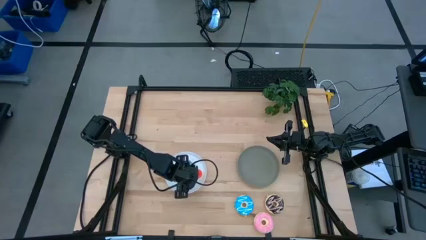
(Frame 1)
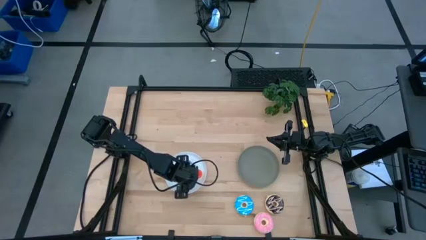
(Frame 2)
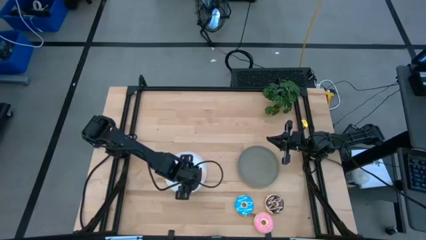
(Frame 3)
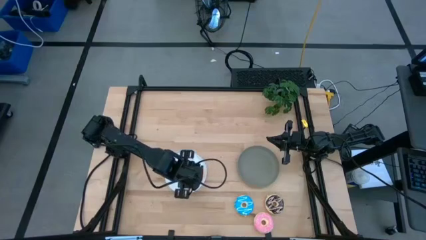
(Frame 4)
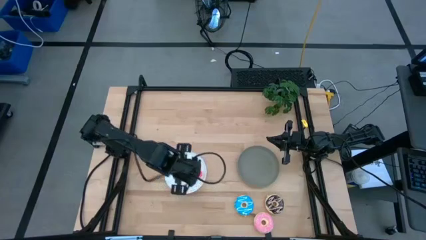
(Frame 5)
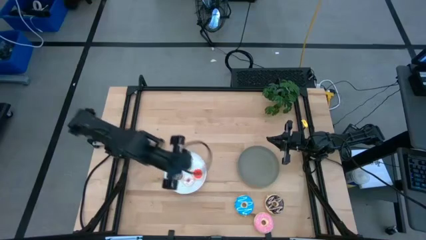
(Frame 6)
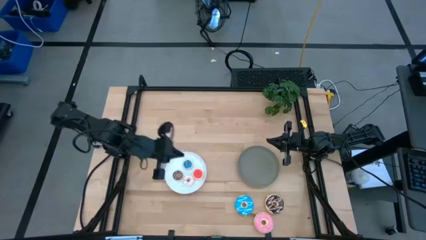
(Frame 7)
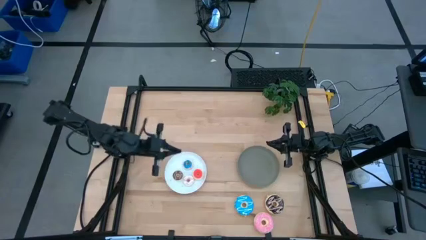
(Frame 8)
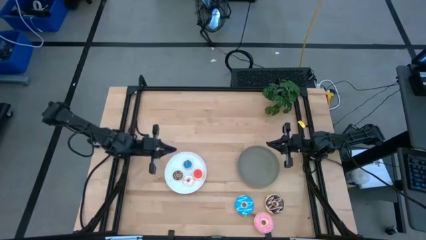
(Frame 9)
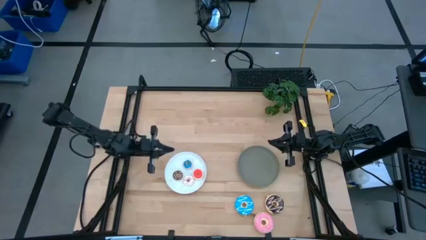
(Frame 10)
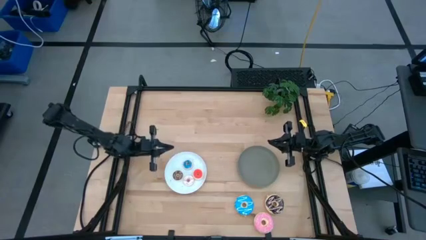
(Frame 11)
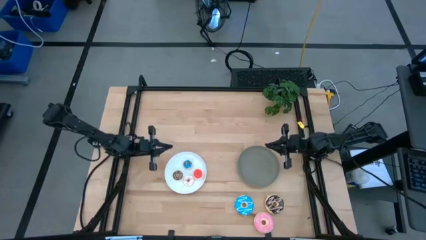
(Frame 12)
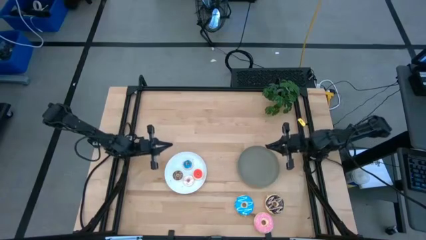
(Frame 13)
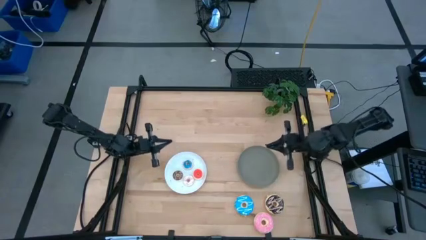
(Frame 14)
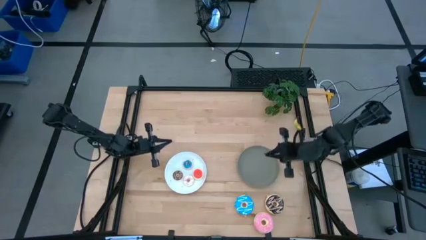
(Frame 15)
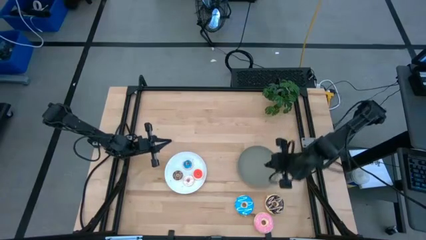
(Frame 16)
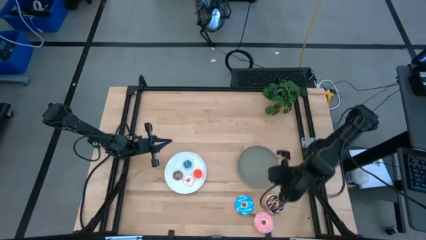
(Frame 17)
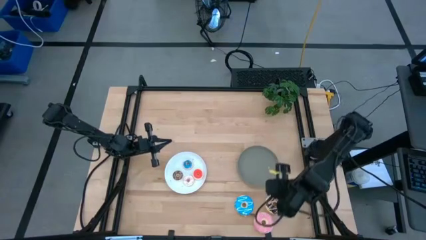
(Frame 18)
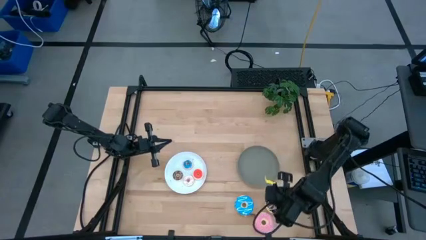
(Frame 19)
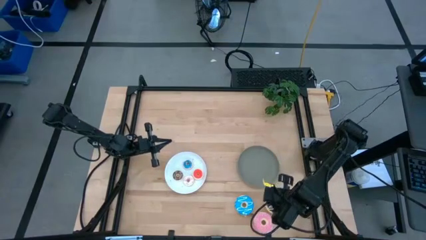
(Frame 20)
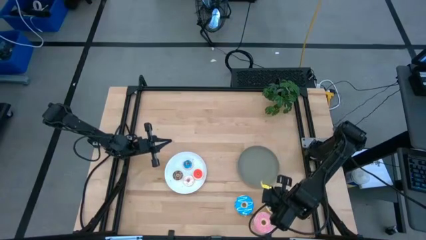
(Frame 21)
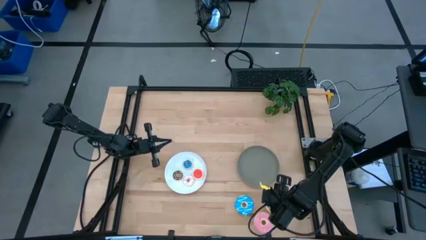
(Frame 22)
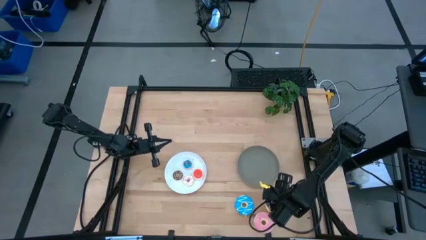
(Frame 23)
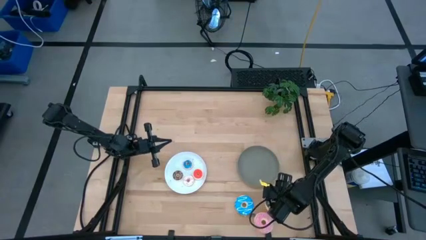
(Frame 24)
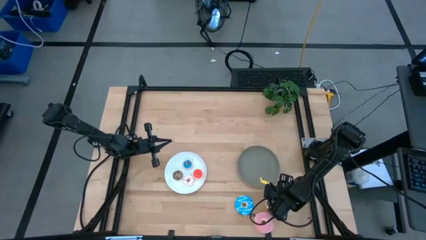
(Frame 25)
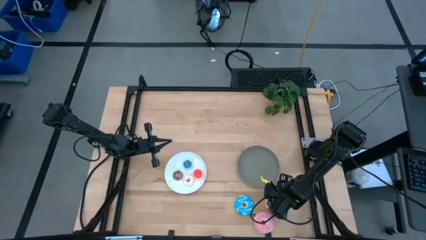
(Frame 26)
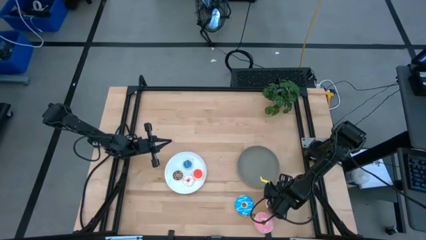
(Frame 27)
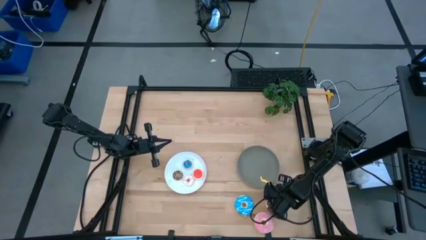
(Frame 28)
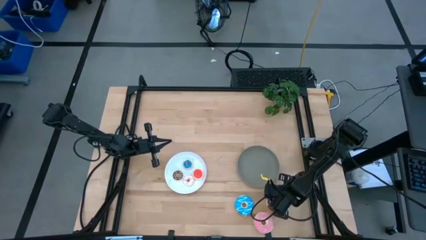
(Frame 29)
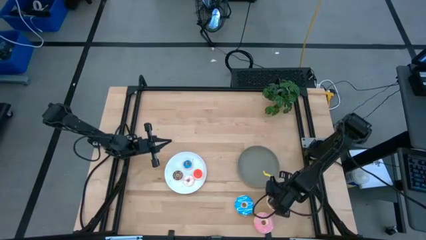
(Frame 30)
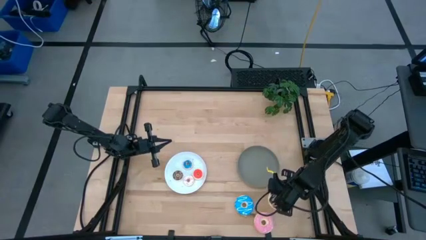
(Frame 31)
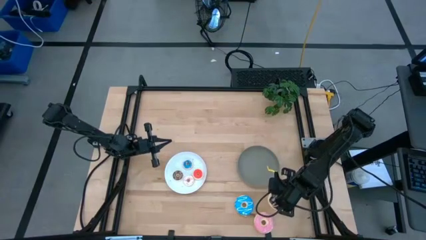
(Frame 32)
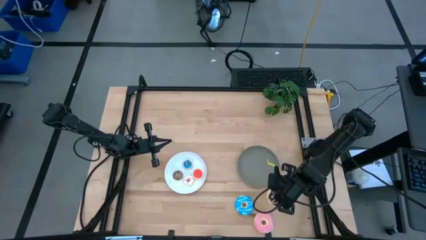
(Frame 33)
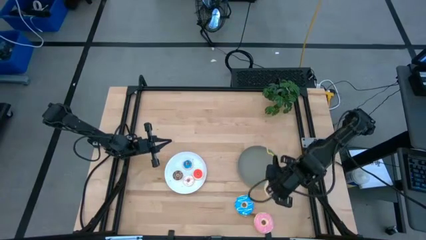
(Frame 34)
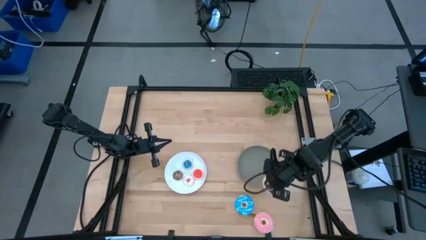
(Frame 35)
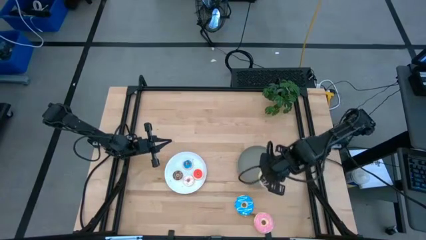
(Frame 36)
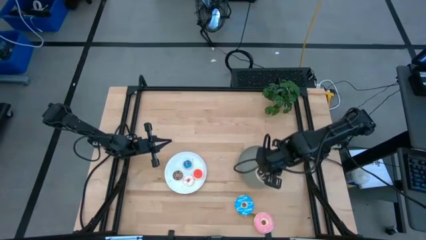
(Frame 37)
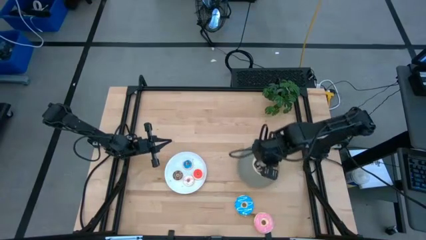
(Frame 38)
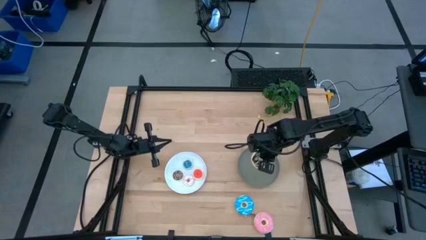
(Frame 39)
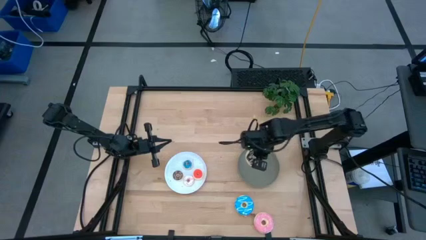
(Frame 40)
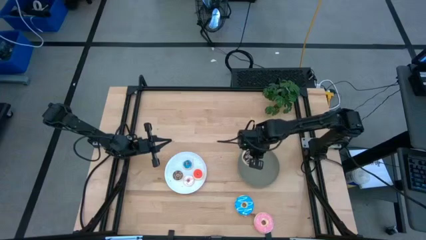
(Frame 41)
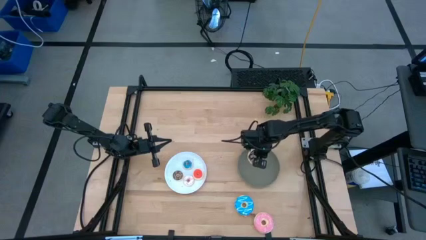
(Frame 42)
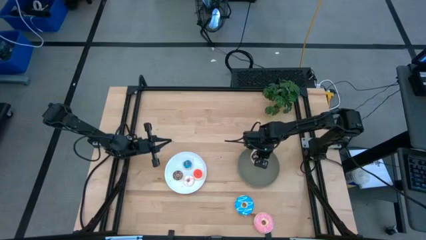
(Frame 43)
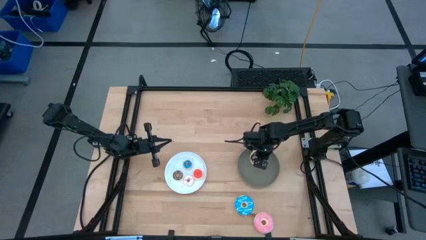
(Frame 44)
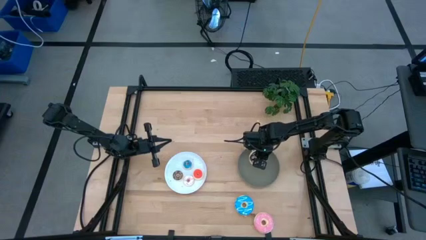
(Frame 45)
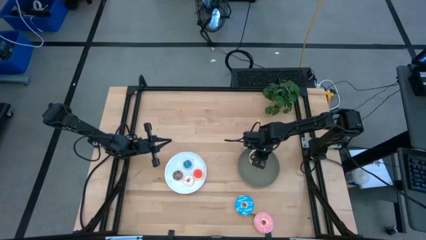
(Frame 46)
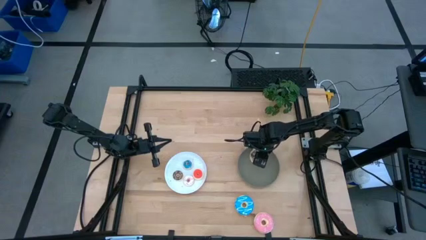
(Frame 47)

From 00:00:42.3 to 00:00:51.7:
Task: Pick & Place donuts
Put the large black donut on the gray plate

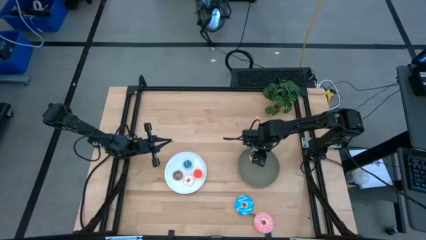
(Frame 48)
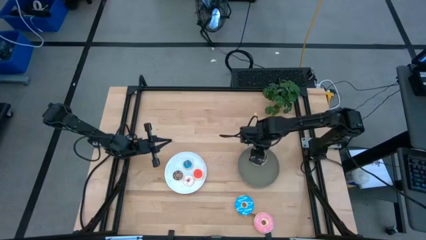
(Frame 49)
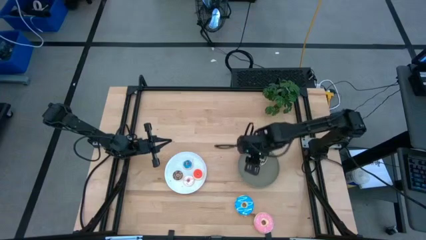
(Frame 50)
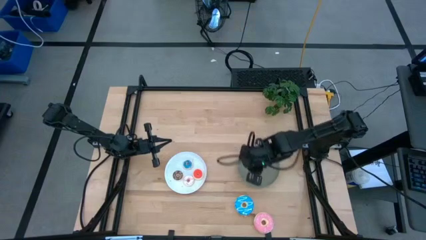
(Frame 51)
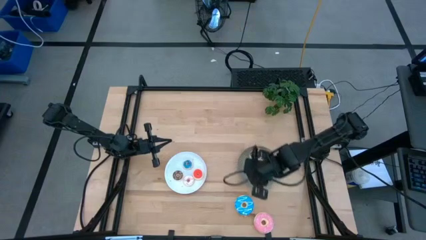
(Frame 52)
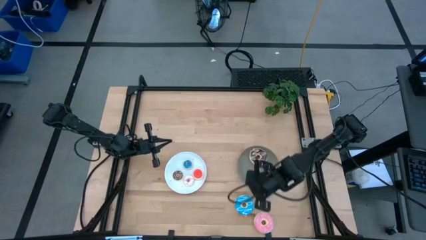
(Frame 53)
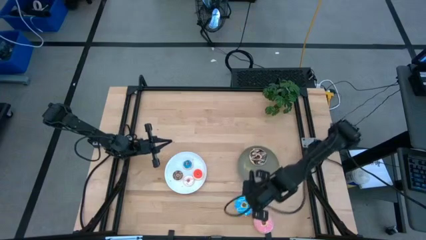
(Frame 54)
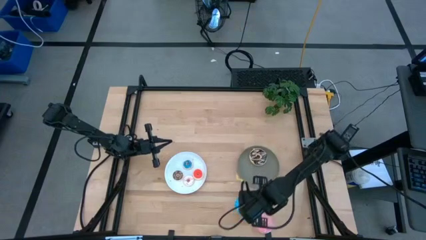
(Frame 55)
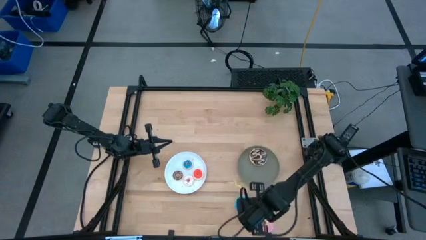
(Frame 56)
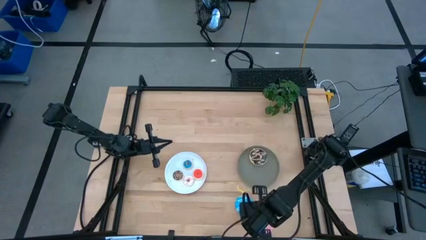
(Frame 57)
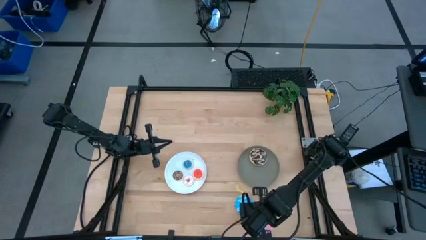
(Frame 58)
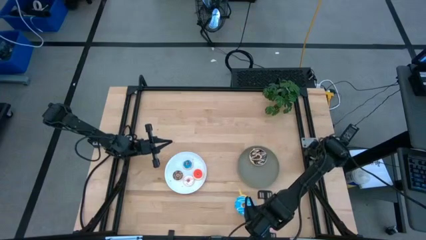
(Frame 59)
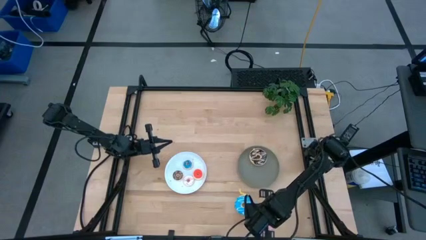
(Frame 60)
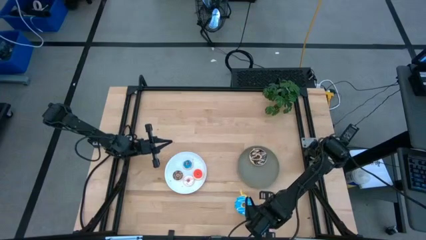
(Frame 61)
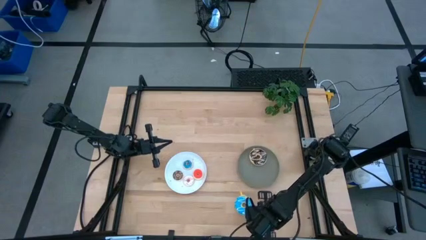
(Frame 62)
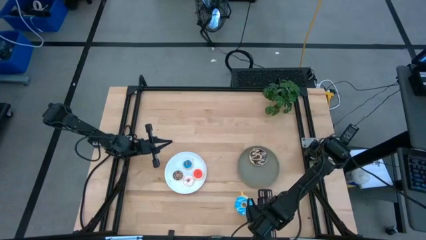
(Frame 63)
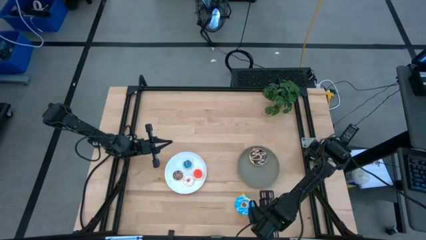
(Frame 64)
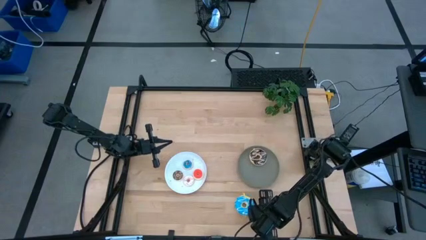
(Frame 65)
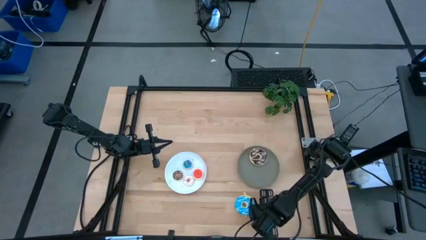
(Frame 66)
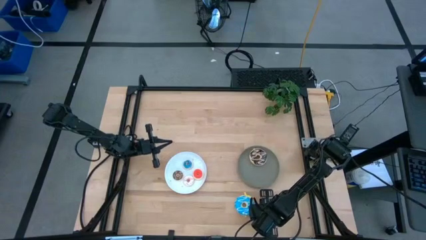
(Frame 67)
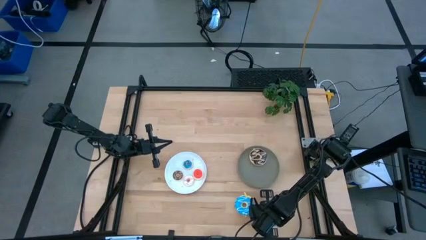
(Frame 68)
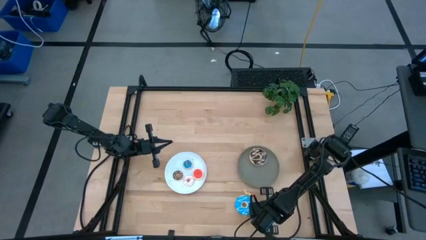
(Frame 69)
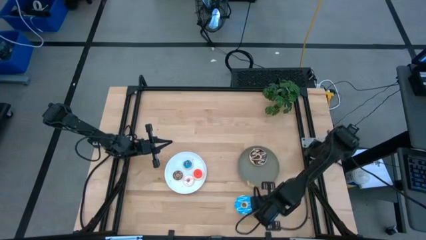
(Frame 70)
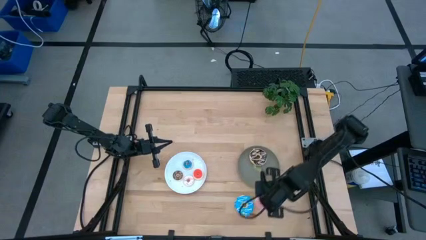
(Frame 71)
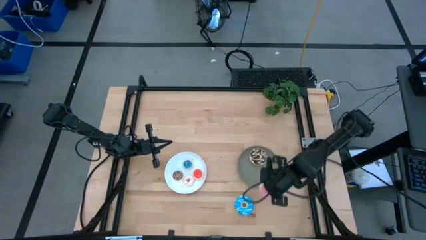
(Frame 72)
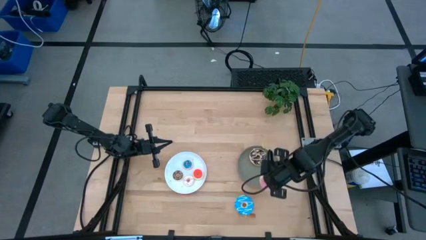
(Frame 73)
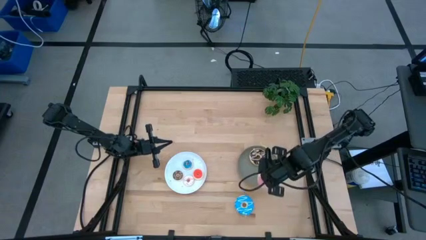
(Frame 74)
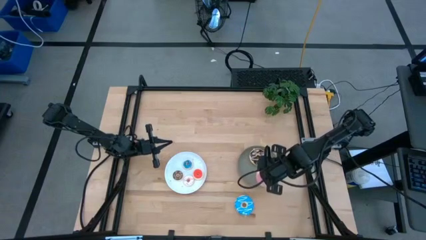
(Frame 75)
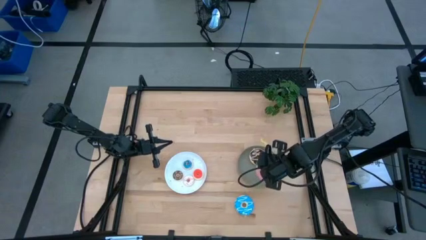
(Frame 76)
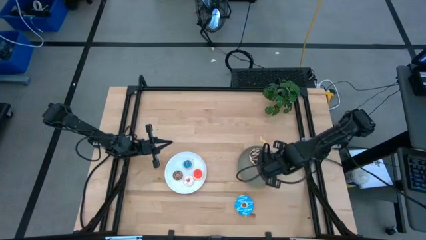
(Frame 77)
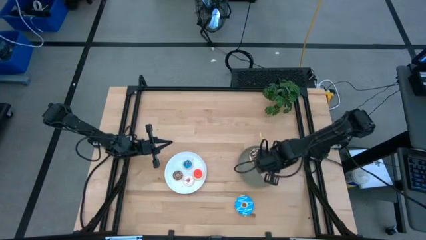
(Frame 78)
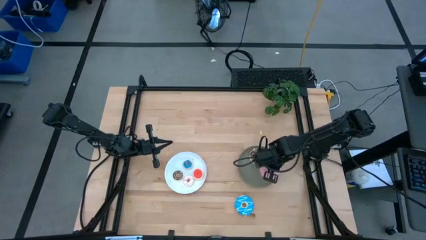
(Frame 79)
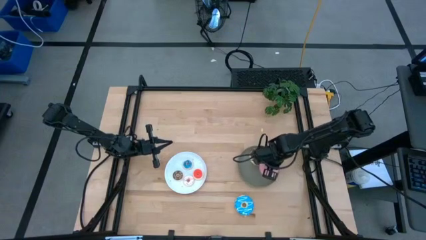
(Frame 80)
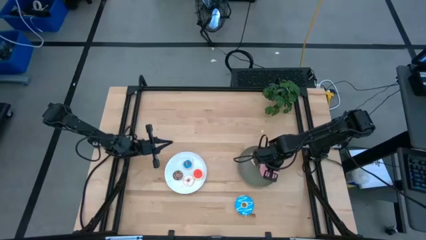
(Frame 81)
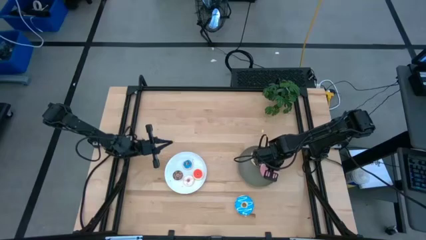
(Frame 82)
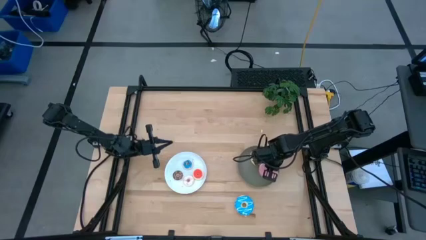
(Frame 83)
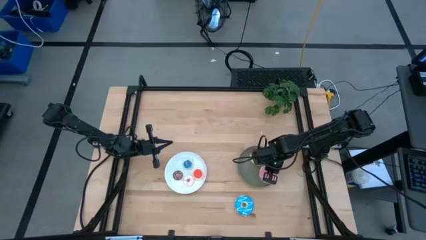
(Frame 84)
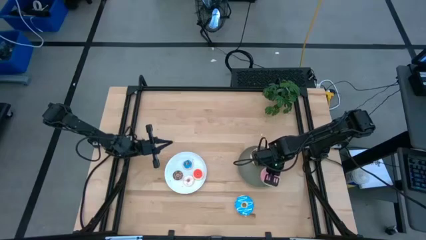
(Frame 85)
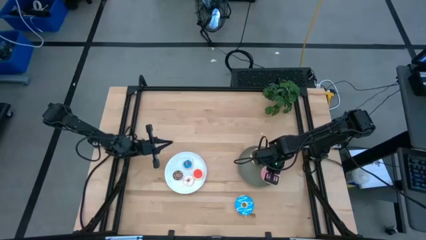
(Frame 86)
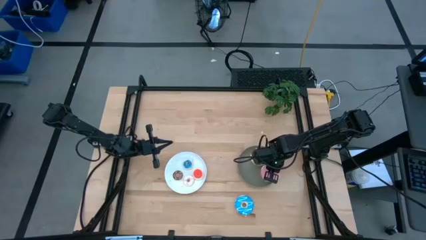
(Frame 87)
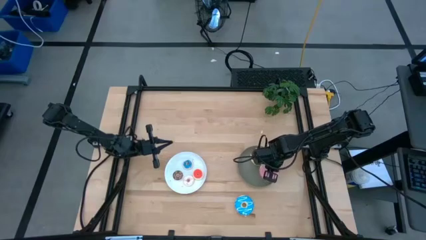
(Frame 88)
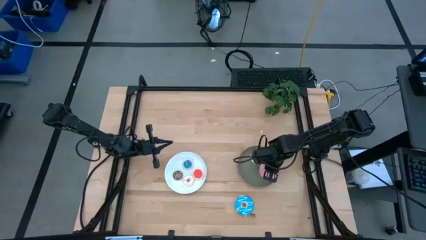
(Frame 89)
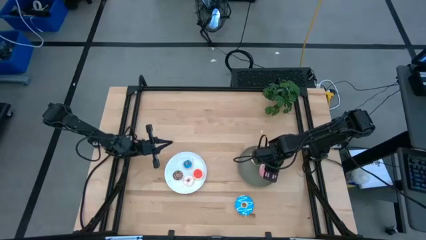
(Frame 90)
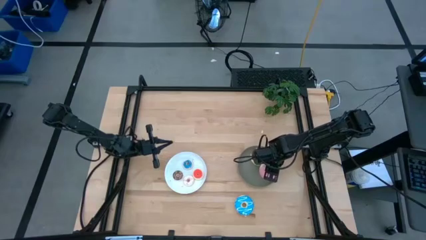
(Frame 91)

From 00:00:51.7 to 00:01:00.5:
Put the large pink donut on the gray plate
